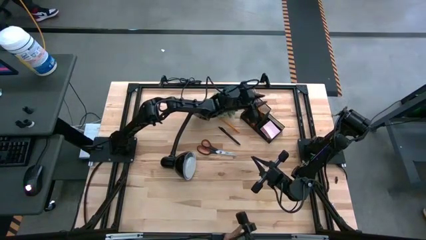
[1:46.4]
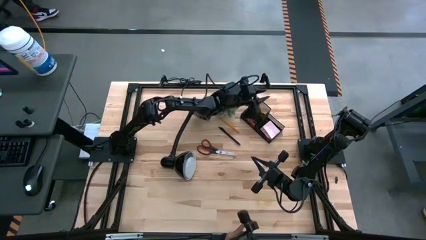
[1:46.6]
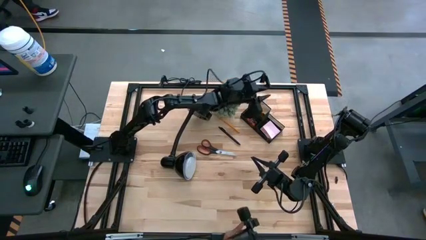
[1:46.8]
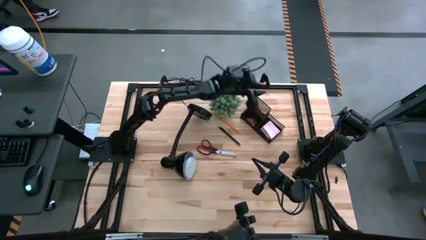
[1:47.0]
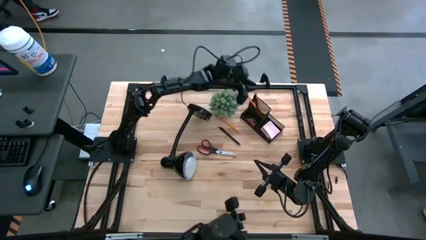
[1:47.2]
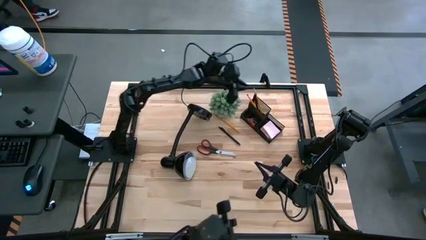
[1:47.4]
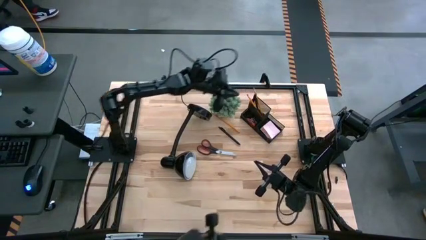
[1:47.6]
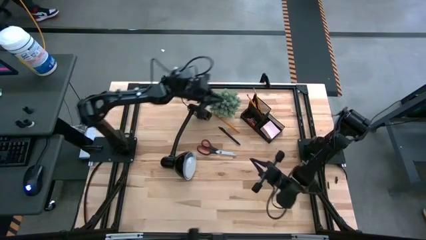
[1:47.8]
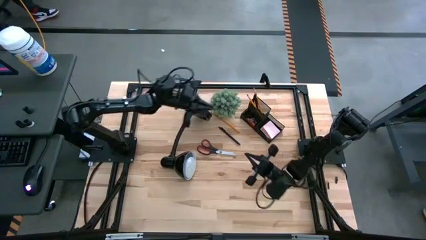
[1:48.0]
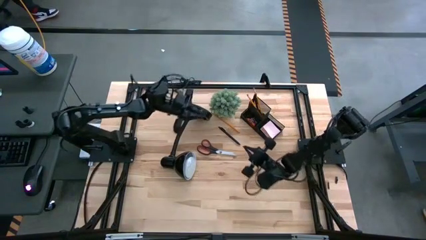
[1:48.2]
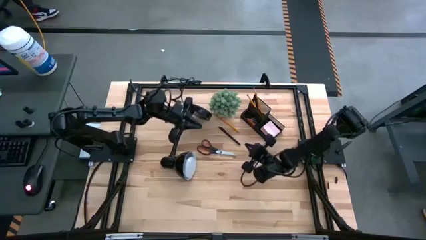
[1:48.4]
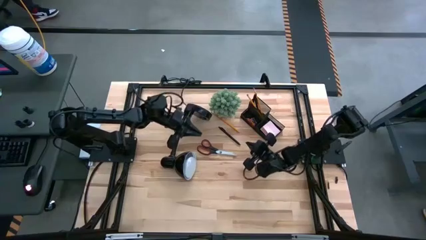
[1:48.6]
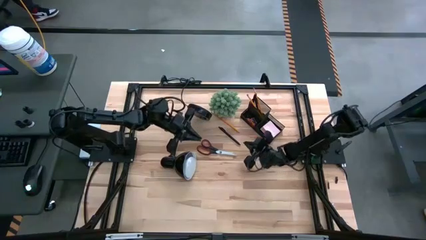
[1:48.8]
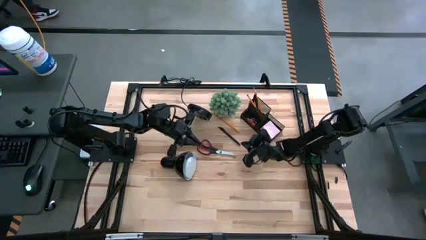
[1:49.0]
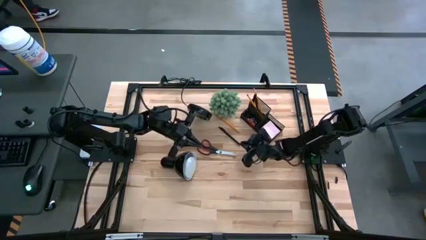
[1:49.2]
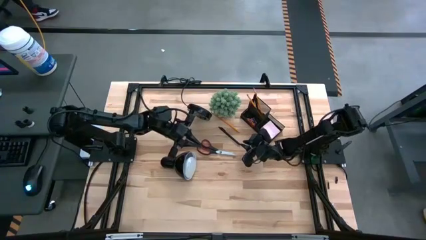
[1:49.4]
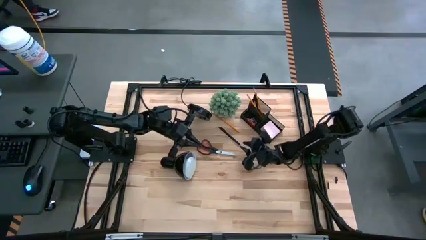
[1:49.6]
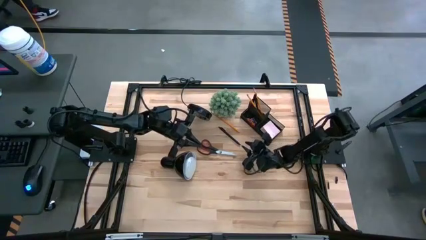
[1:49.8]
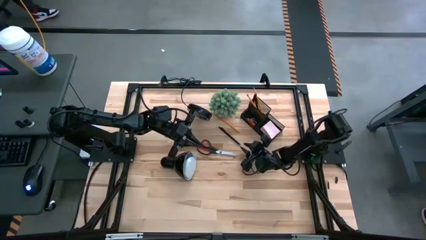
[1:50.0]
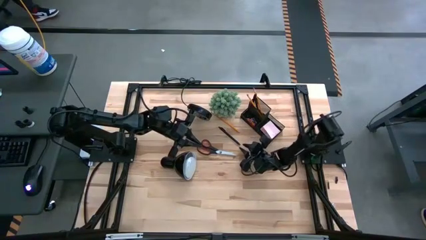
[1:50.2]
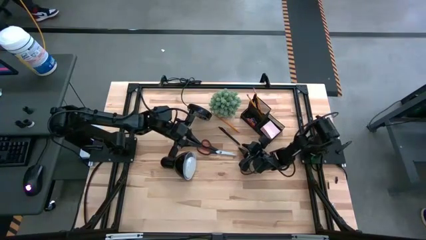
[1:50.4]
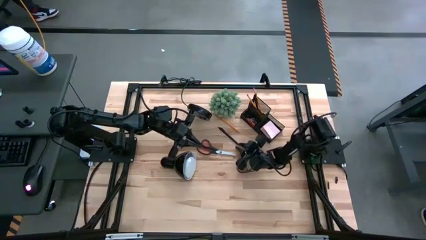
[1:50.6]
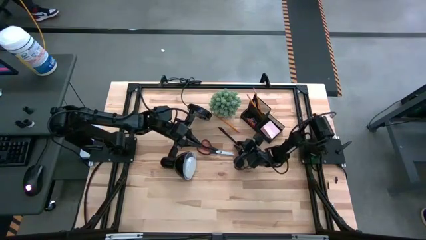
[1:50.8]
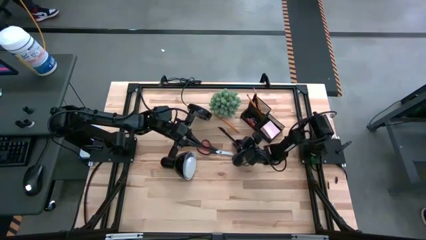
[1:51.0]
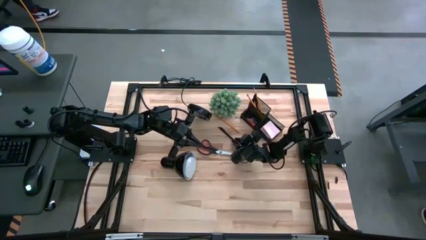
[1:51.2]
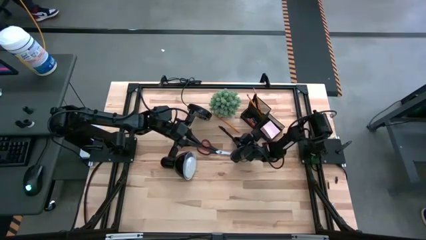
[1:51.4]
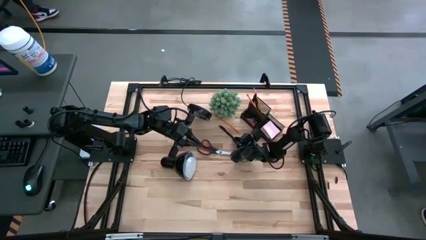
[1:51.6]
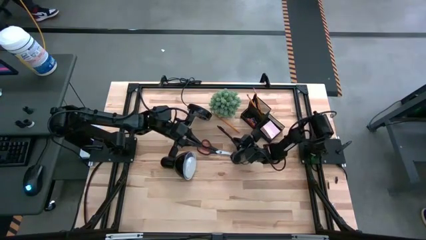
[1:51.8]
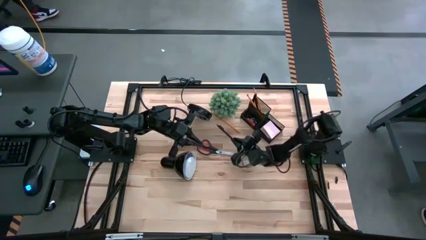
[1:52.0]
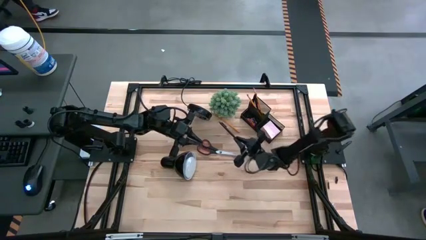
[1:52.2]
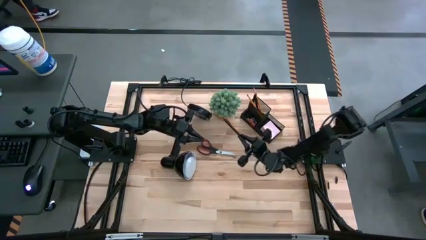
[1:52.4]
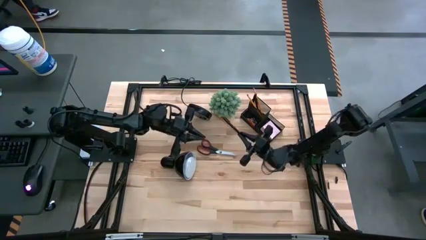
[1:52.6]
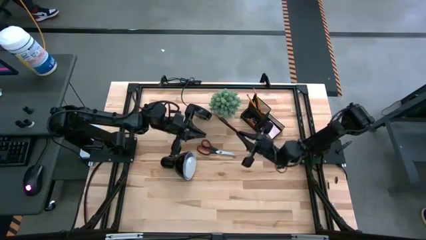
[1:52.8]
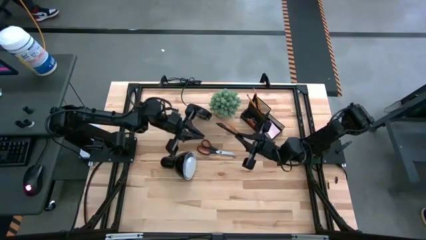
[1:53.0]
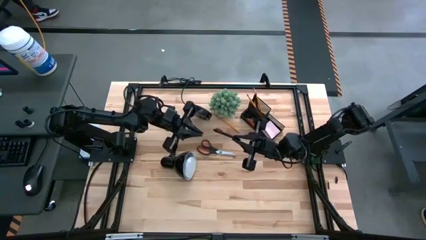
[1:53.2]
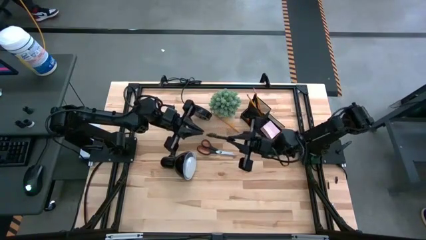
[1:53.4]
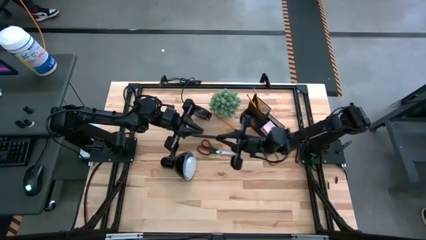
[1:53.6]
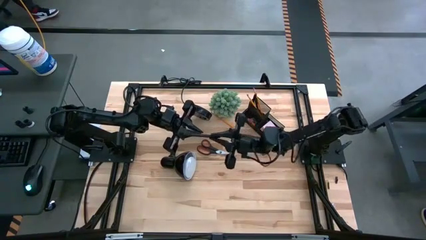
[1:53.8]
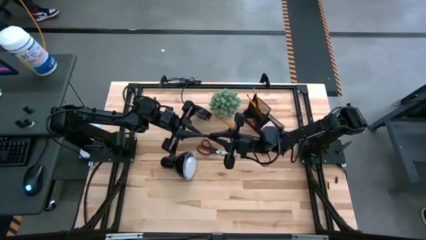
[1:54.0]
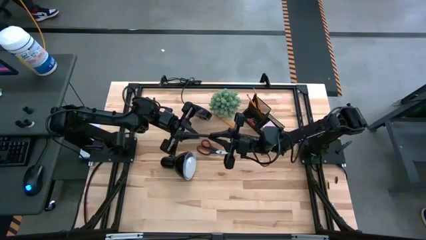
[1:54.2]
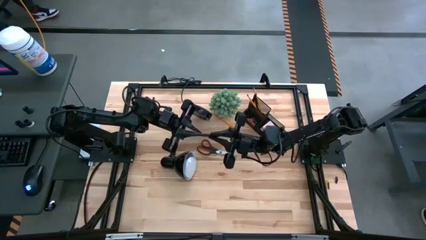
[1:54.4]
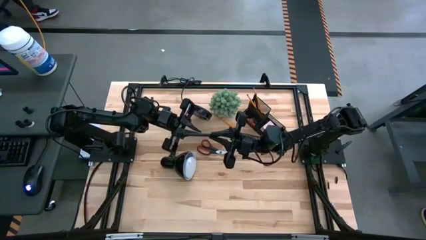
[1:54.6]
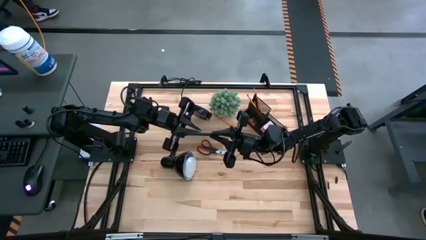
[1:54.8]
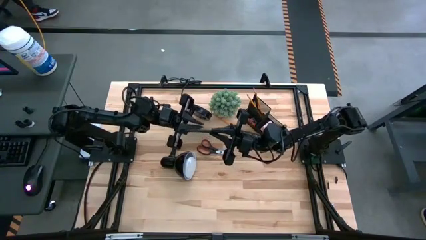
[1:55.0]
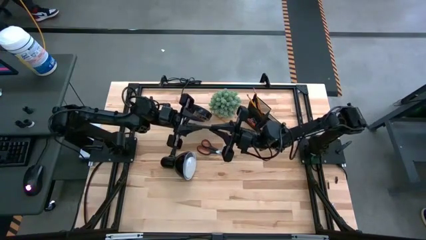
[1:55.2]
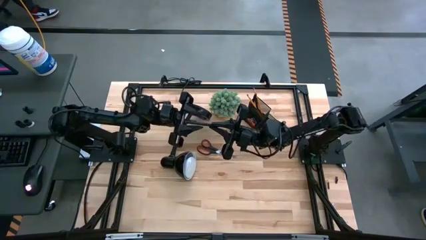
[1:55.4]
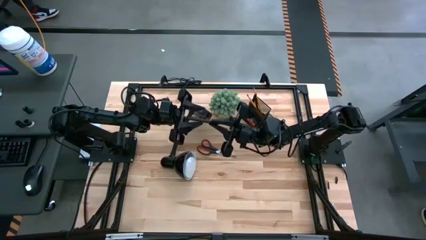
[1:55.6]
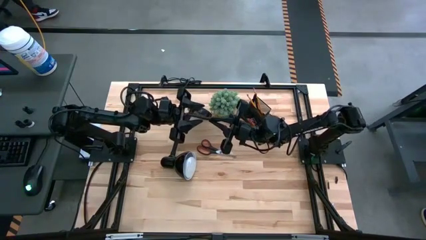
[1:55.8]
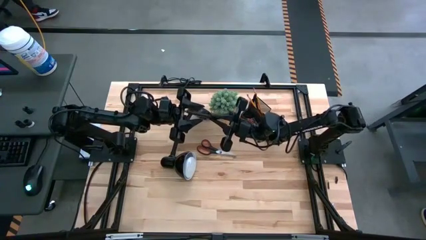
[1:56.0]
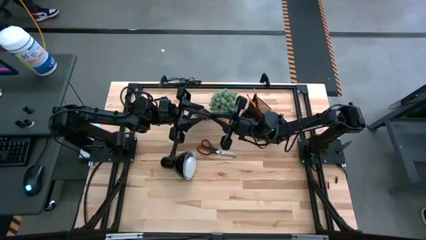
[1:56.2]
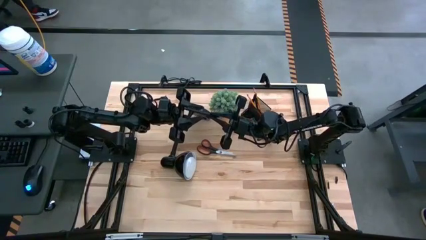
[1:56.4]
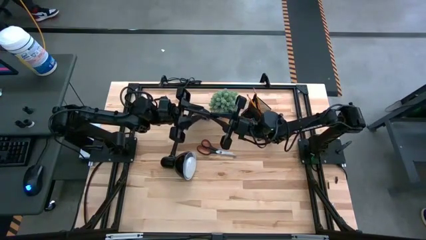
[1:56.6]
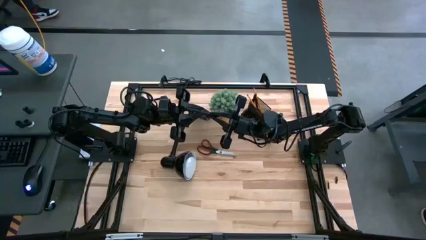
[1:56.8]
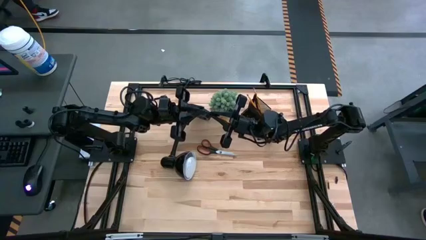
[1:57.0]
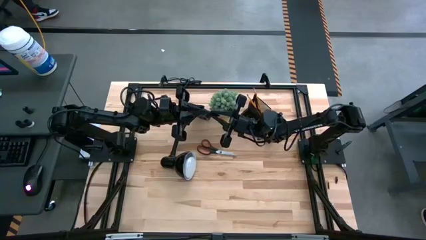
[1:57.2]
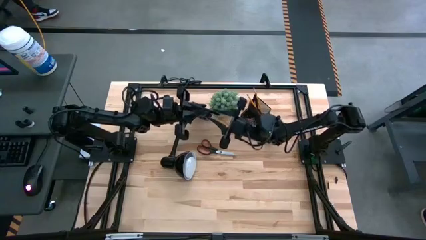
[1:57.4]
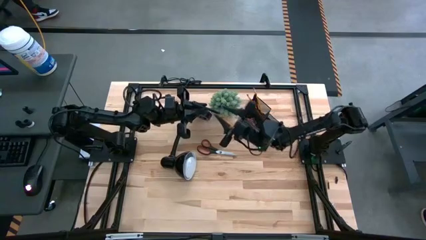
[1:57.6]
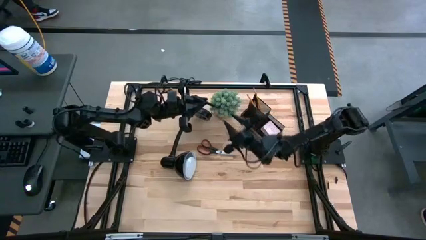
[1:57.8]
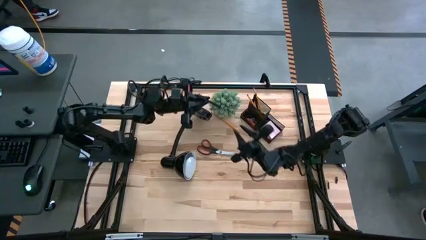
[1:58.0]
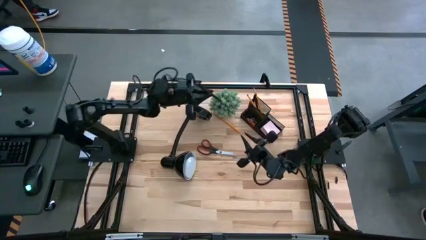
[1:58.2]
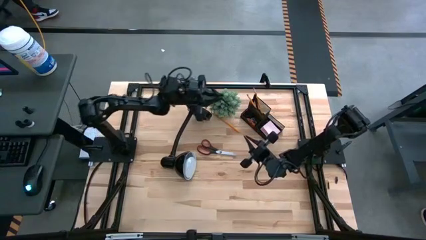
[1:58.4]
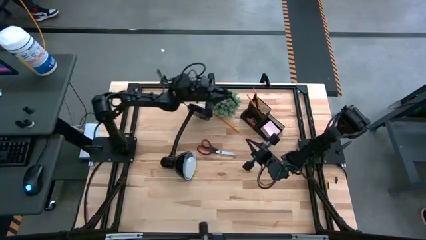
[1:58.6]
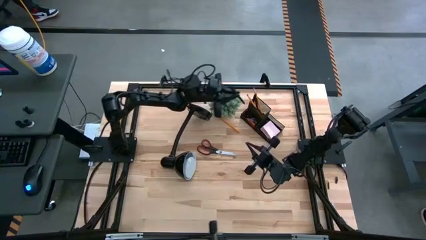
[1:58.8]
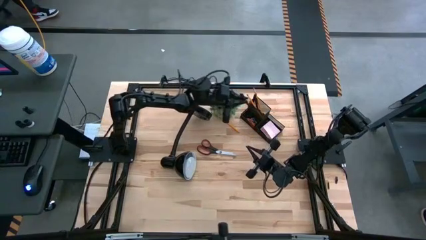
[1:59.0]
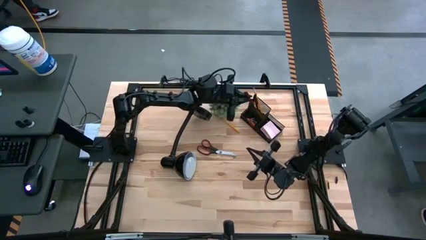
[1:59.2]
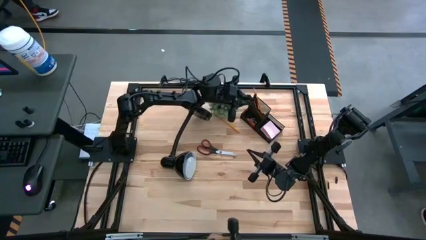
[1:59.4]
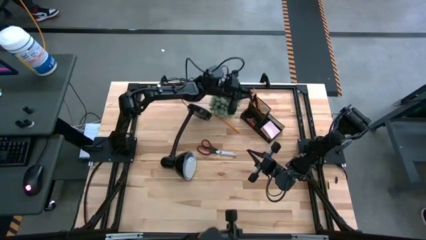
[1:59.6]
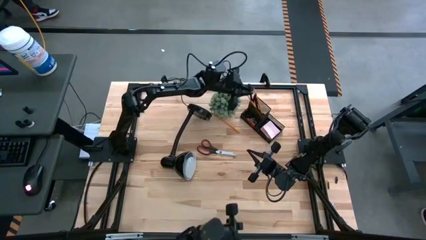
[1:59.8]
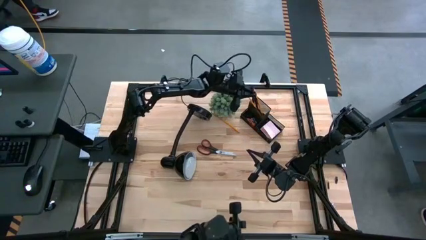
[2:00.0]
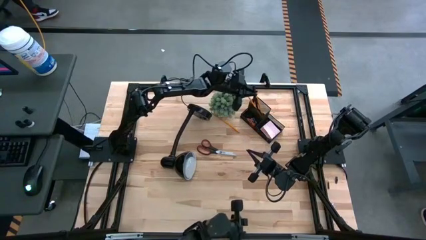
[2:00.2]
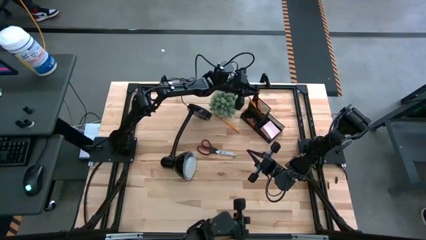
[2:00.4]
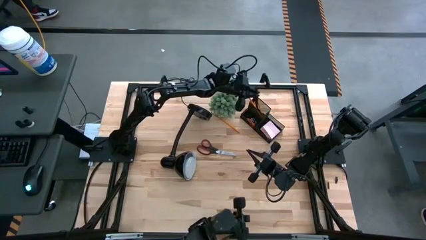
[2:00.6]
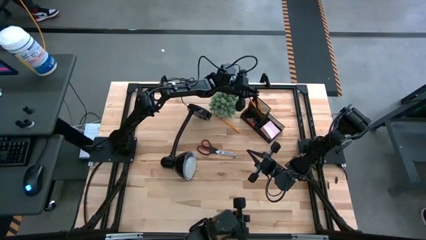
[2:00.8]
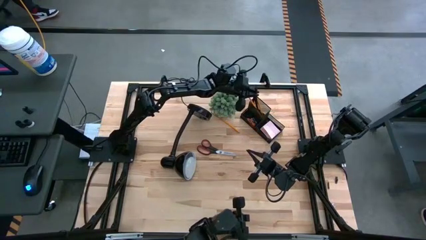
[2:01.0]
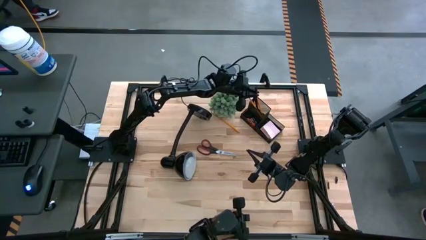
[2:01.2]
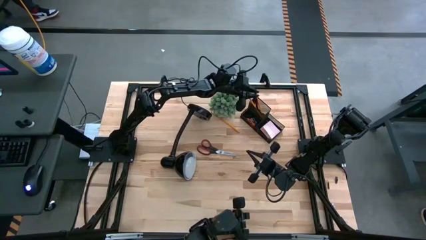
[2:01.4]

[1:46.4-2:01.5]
Task: Pick and place office supplies into organizer
Put the pen into the top left section of the desk organizer

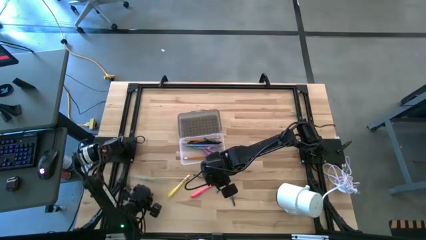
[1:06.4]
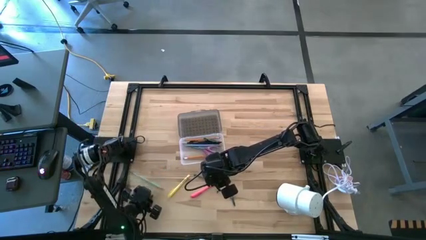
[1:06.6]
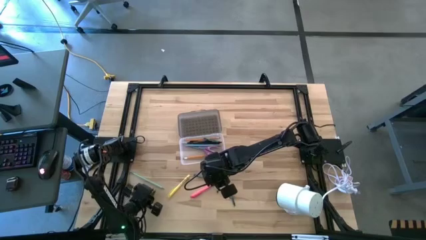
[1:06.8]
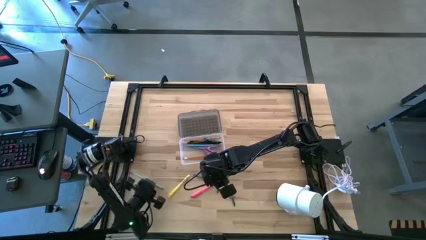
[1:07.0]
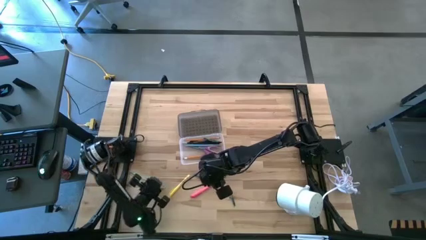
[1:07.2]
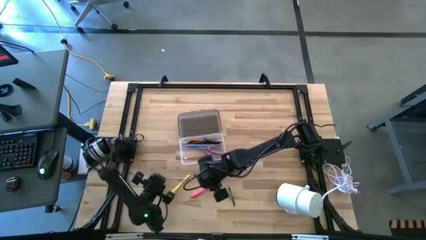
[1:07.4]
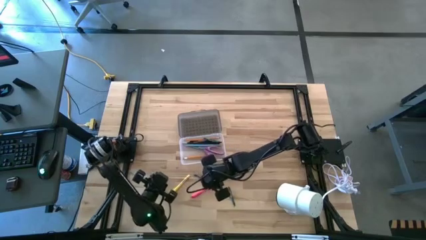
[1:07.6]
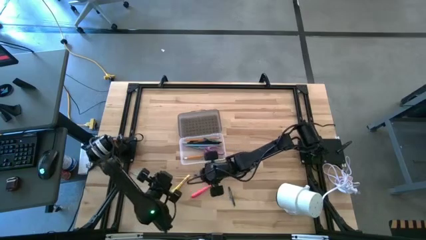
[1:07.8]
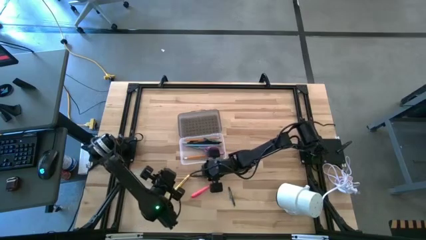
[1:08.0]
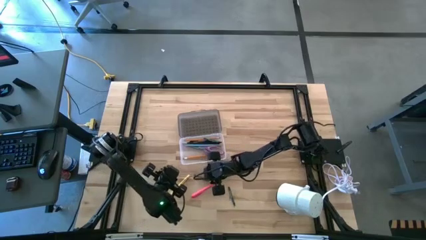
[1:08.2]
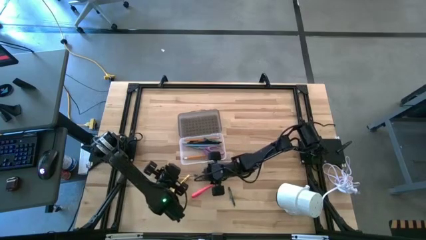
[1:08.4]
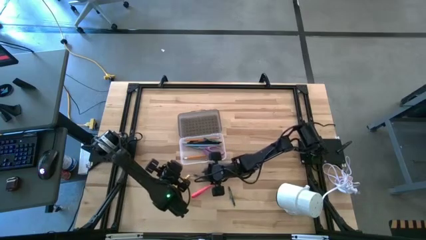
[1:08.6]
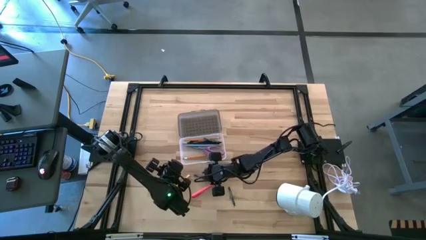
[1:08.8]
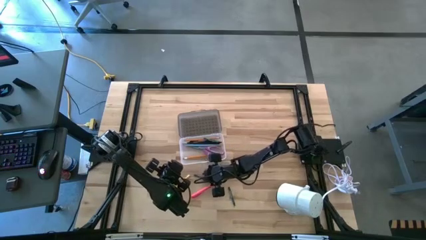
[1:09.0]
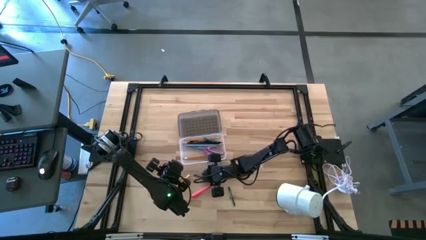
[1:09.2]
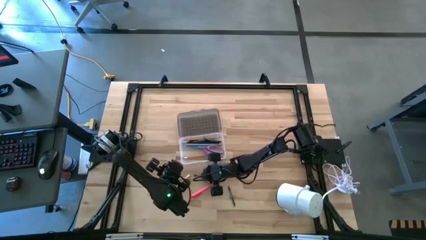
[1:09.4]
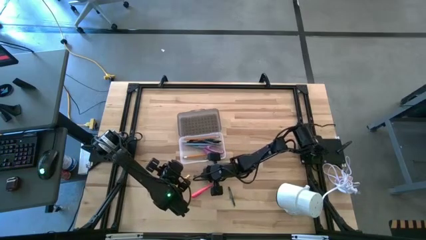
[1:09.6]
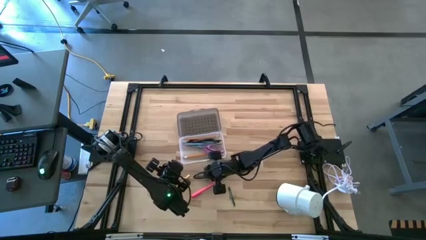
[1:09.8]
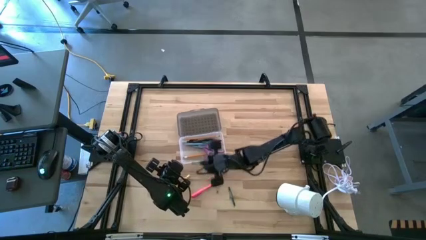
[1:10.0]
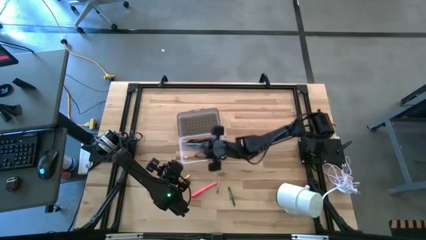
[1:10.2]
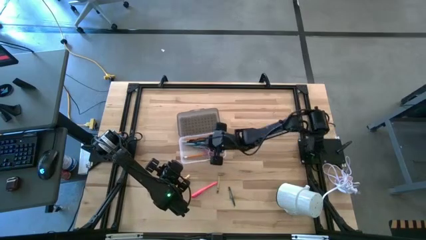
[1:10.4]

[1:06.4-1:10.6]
Task: Pick & place school supplies into a supply box
Put the dark green crayon into the gray supply box
